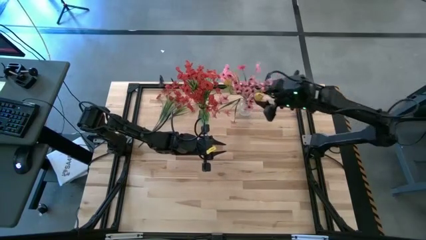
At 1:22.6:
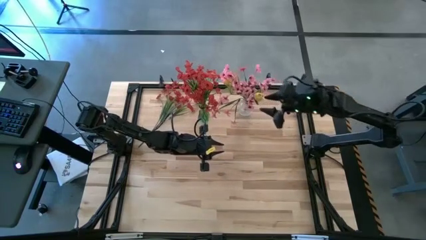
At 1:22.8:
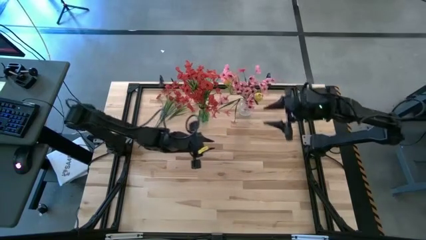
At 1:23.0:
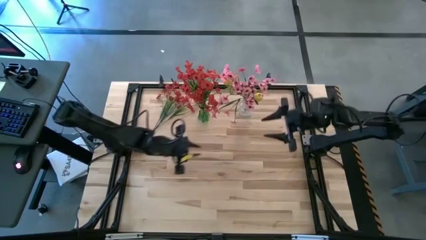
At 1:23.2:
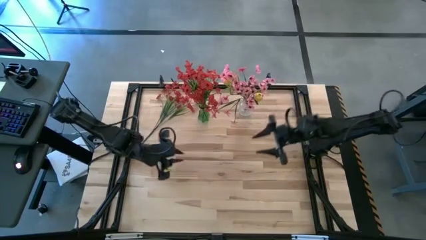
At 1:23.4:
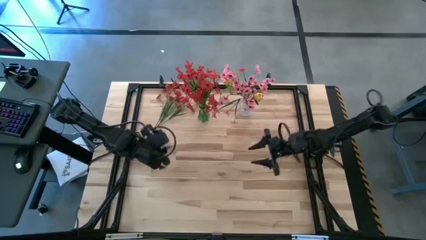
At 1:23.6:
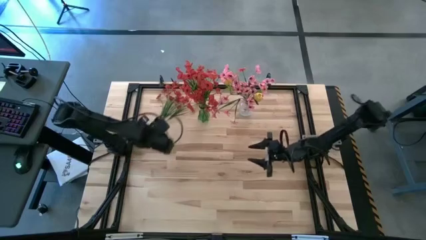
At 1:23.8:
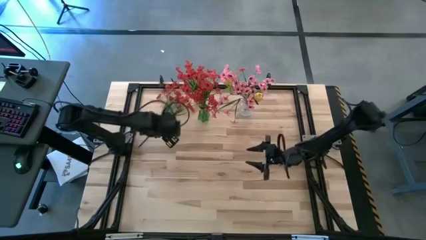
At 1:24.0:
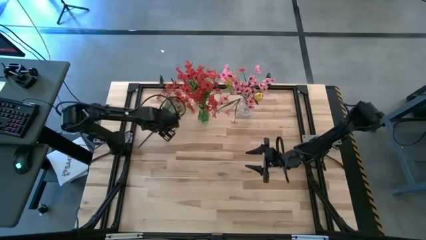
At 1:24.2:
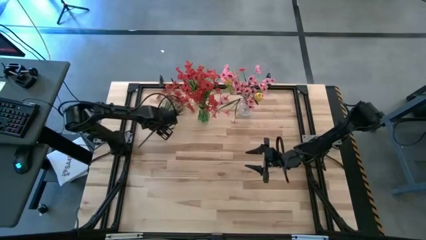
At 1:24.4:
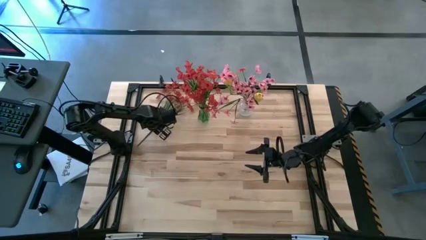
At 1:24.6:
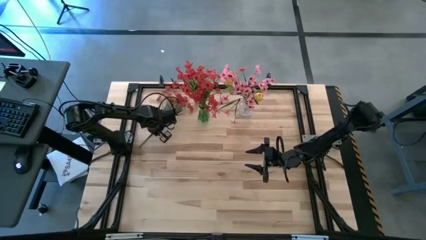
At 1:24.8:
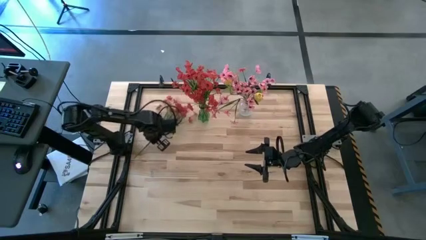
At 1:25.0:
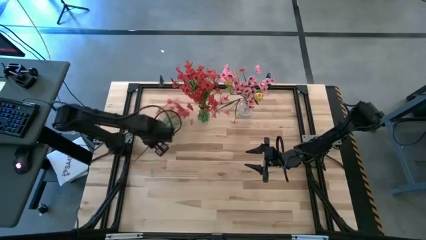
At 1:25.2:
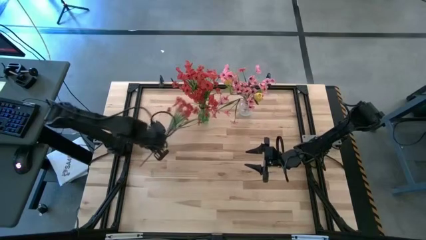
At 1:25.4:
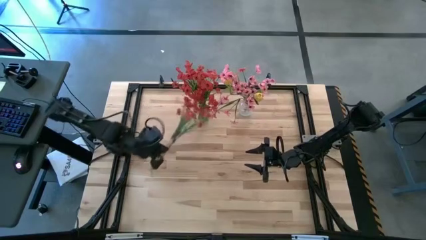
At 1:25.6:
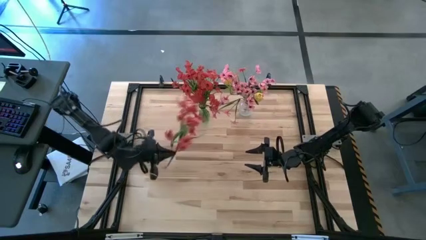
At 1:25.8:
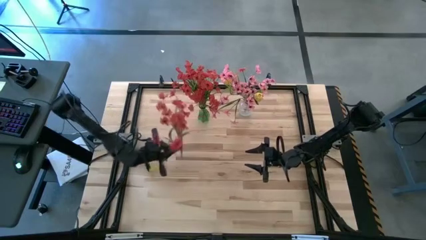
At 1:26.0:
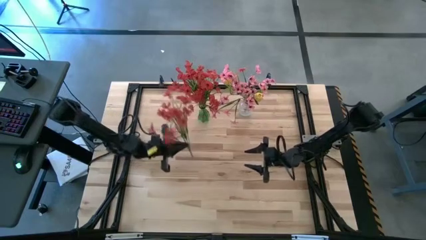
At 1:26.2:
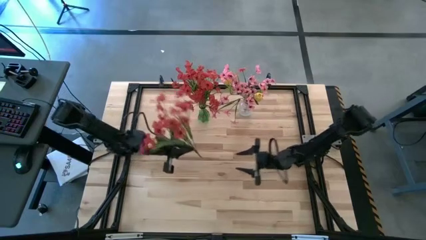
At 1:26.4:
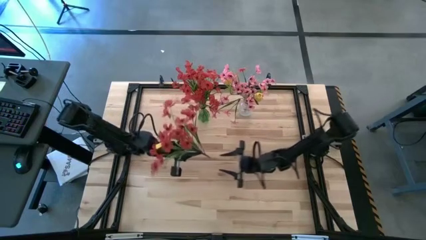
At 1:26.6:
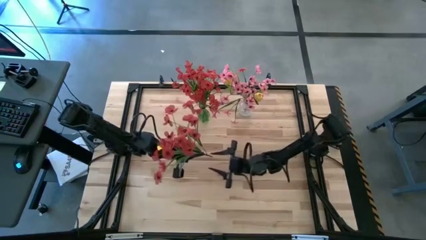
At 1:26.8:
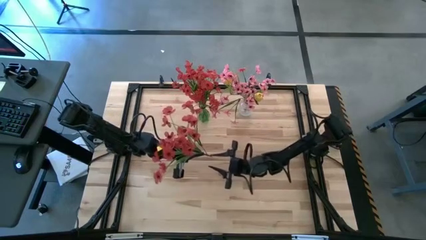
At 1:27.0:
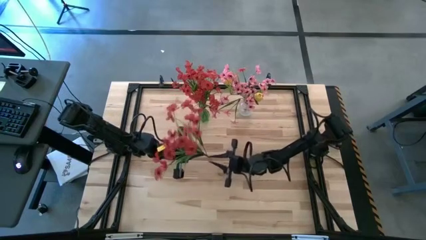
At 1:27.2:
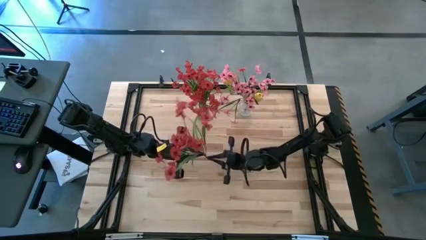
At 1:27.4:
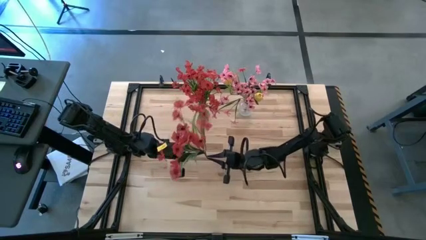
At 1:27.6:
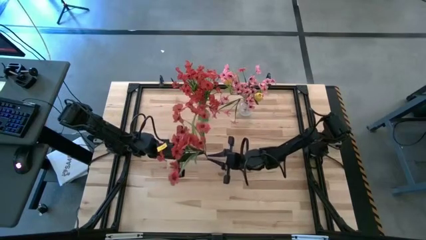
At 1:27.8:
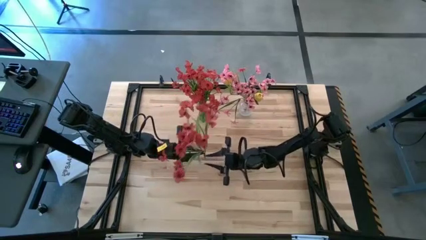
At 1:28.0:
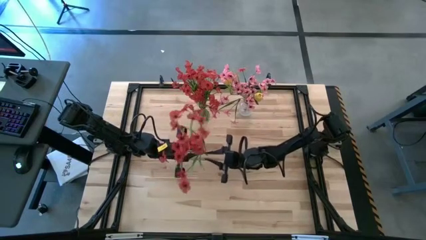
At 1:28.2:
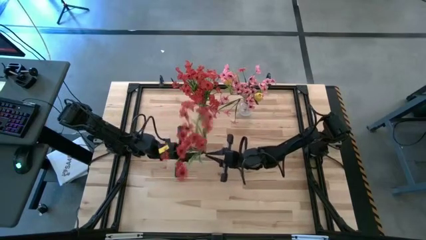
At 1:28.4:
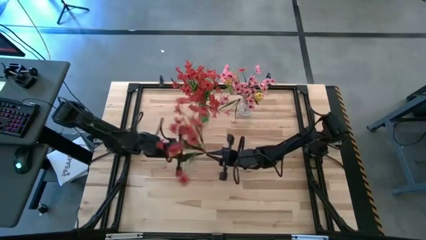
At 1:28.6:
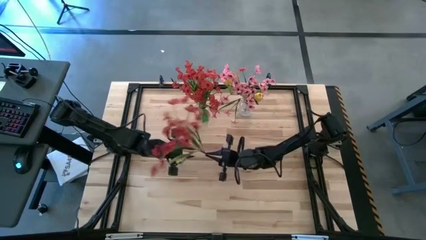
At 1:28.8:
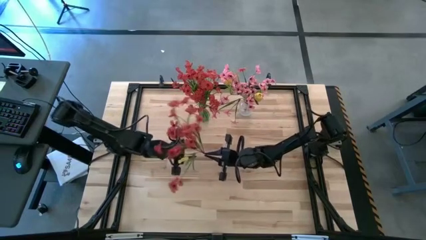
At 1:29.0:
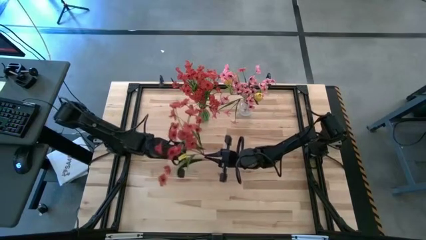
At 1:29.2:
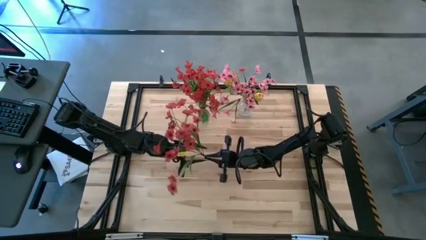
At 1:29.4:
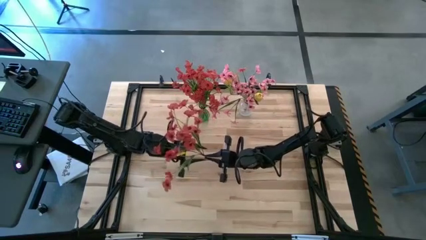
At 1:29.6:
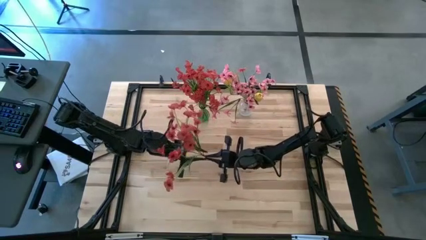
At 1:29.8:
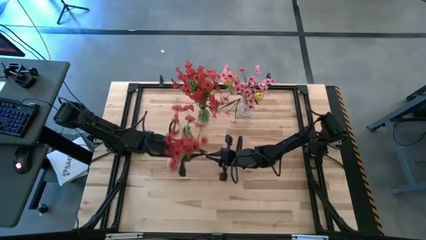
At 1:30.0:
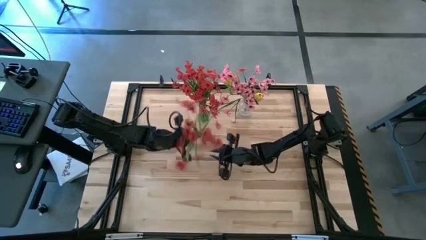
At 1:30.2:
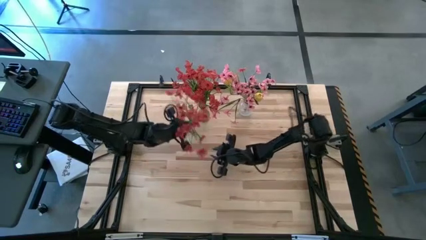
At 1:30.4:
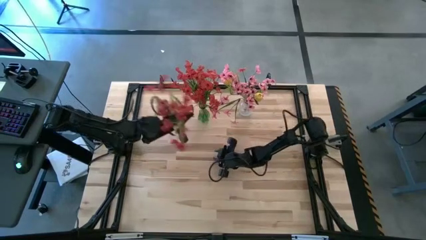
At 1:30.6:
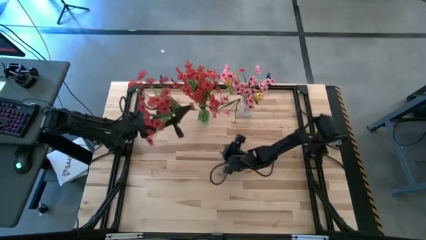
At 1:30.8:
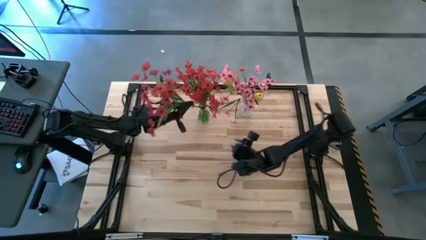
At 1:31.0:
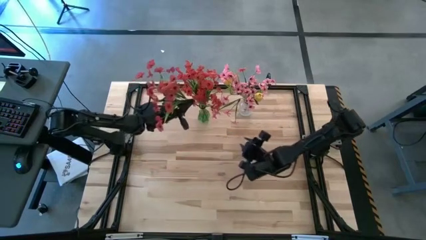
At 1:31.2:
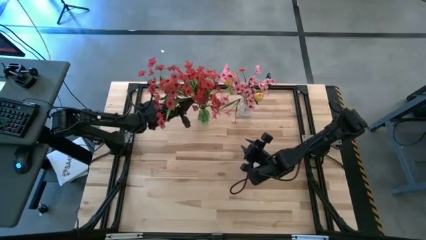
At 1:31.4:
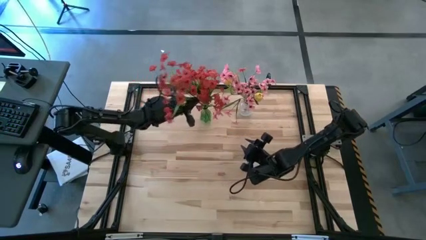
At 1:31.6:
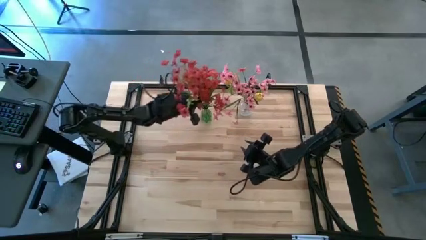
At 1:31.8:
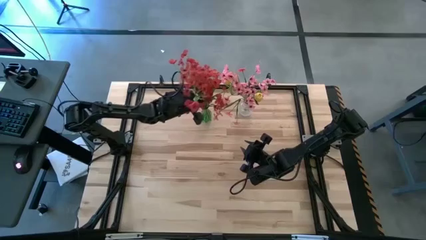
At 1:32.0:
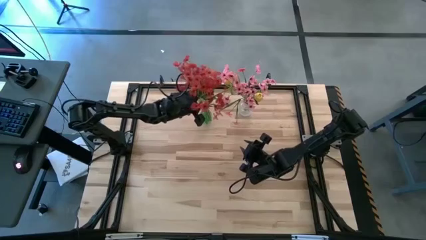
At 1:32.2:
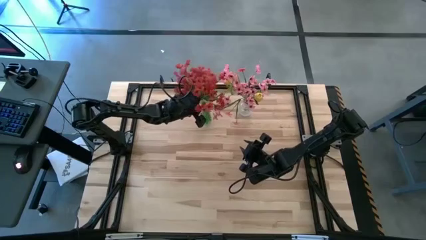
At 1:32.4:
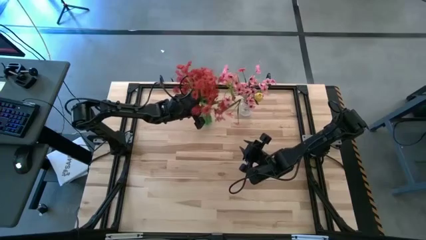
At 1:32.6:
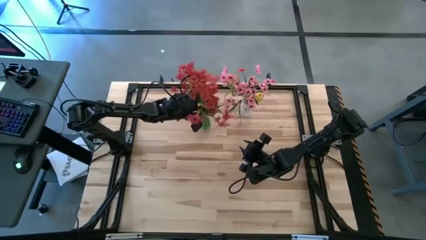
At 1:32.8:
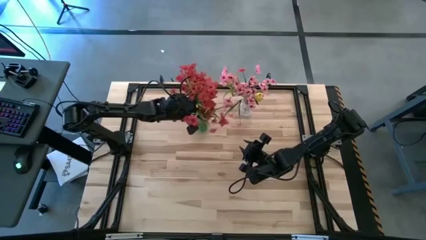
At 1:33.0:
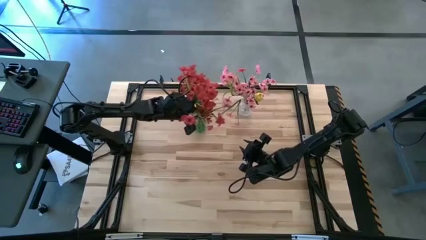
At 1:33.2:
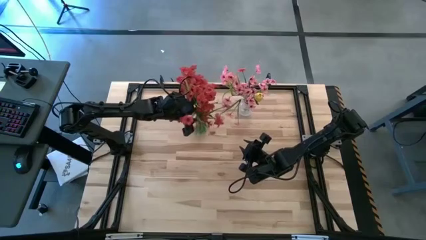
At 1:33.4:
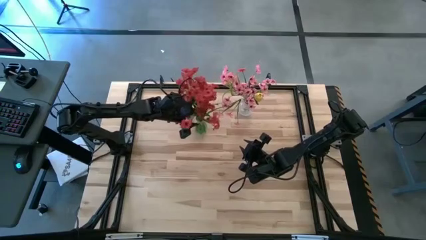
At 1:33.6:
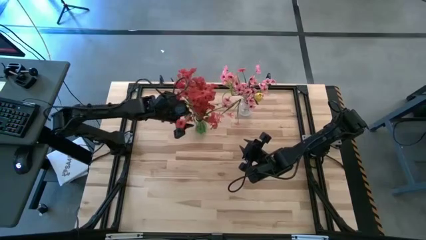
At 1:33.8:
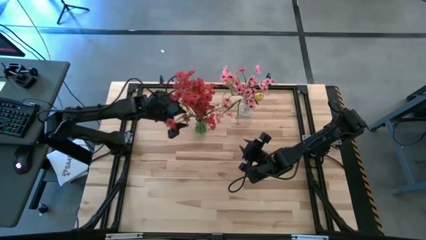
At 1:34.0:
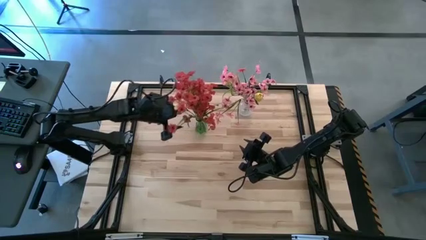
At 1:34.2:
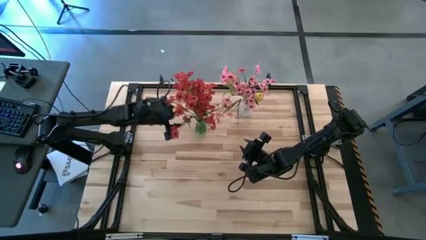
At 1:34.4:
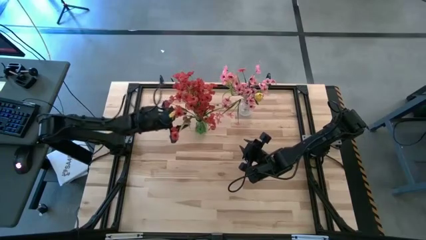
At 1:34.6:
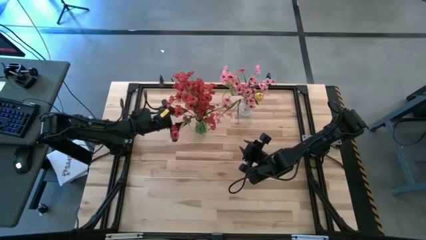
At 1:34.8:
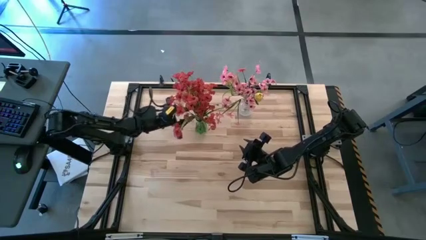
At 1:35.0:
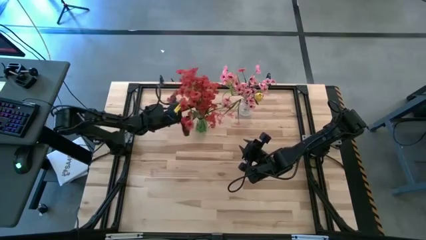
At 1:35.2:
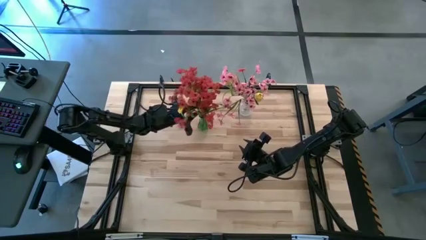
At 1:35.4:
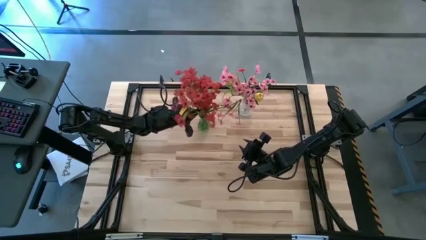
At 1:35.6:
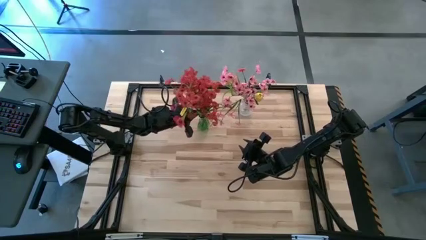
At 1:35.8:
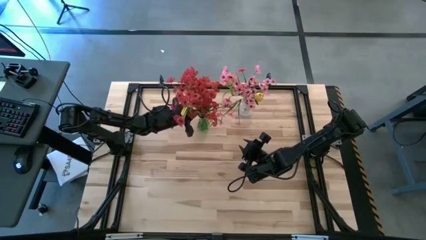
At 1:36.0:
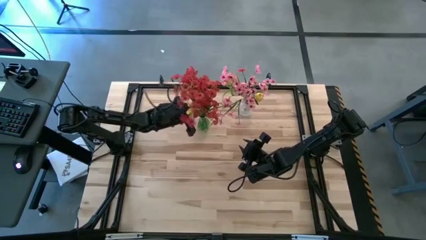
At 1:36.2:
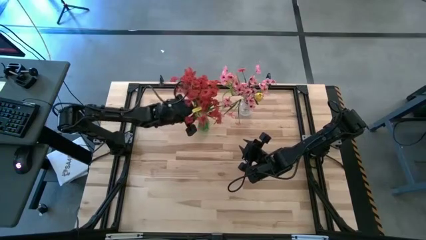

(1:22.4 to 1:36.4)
Task: Sort flowers into vase by color
Put the red flower into the green vase

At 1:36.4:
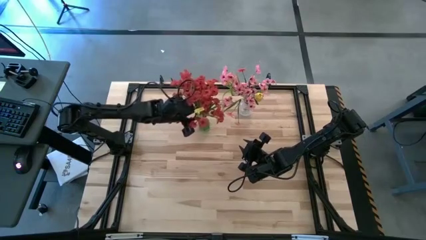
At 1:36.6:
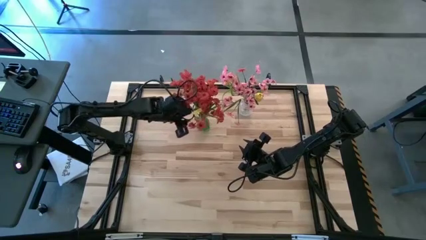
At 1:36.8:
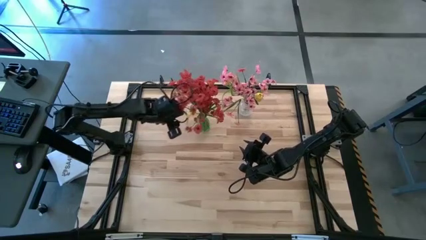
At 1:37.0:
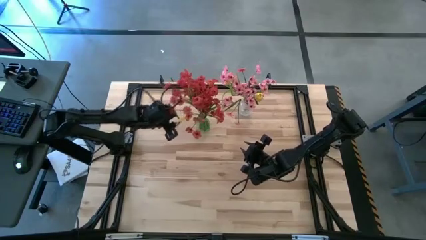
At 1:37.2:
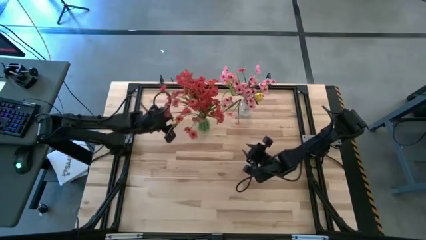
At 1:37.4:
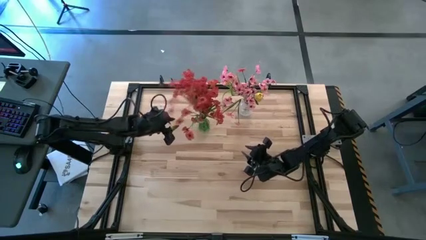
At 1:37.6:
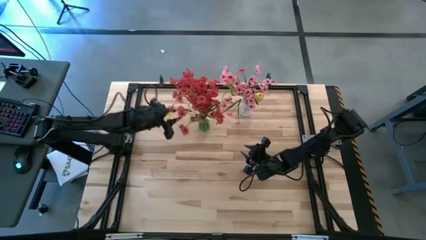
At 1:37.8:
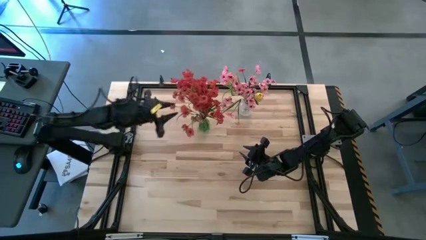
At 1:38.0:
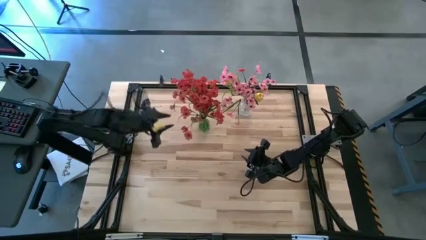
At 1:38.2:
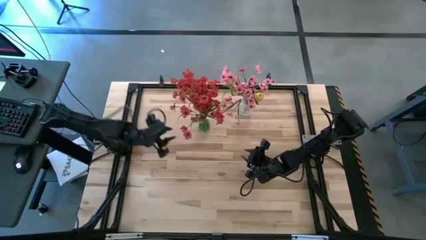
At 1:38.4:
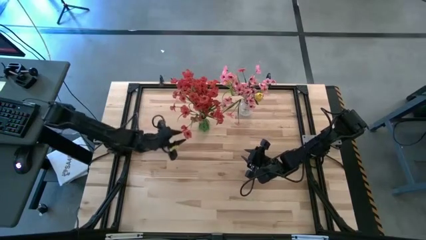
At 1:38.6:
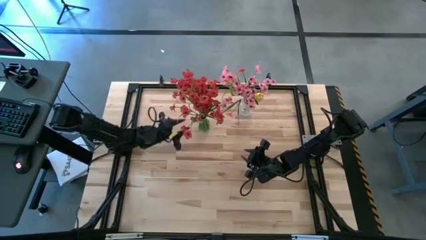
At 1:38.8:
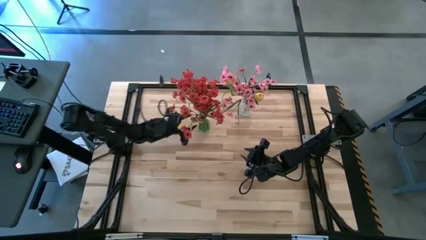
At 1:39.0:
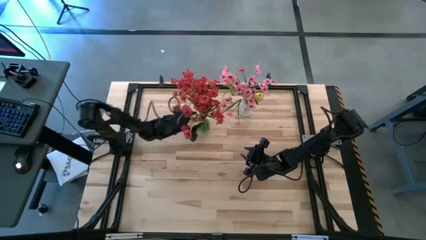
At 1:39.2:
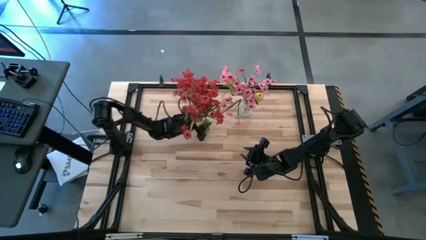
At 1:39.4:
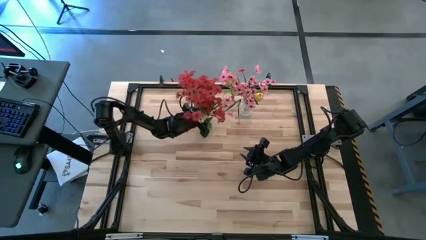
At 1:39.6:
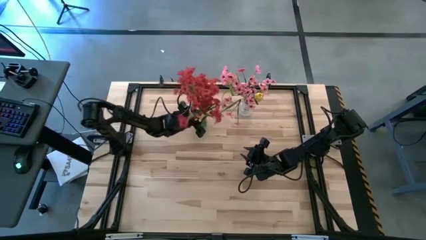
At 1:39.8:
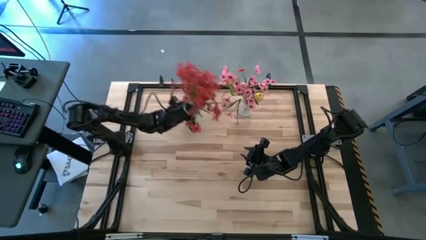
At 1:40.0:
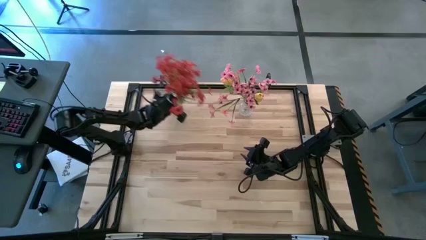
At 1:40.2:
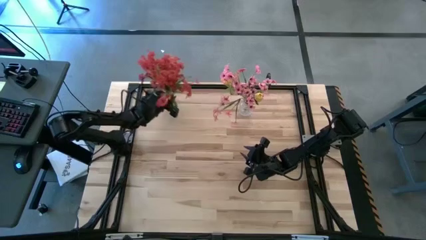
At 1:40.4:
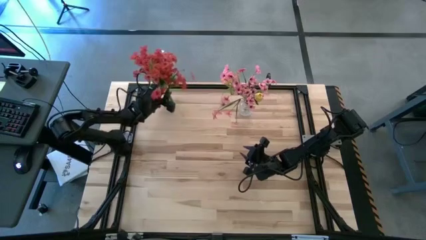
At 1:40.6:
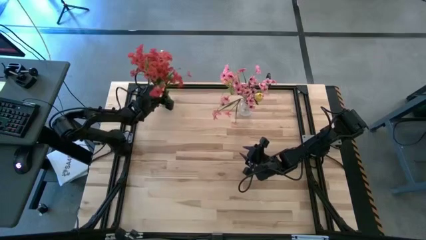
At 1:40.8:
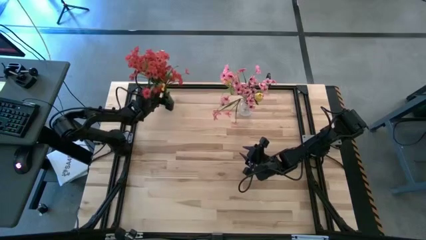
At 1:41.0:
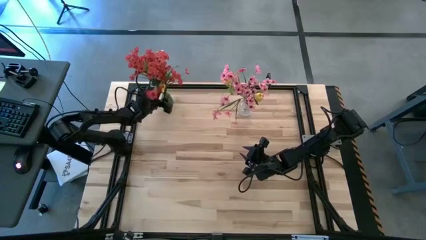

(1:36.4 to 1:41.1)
Move the green vase to the top left of the table
